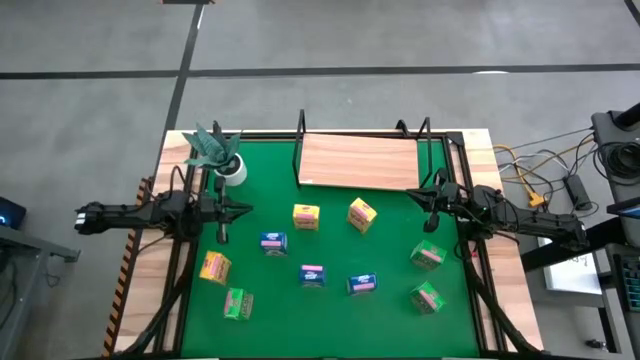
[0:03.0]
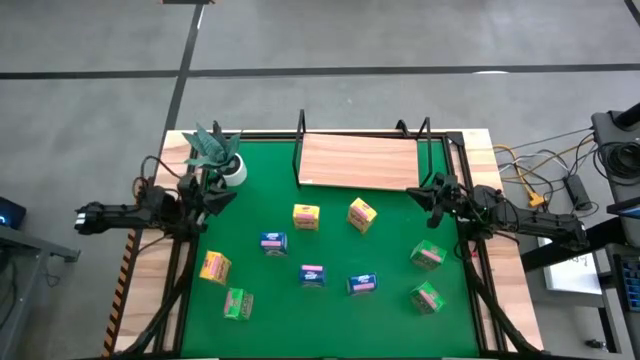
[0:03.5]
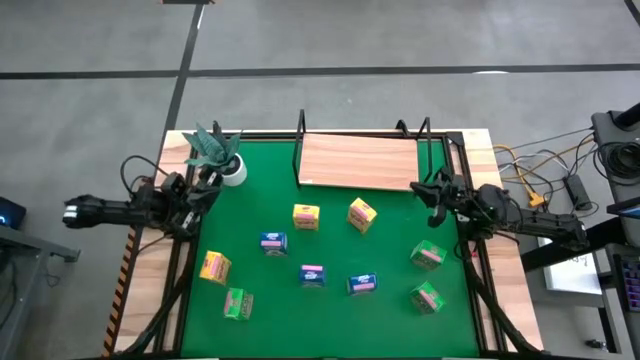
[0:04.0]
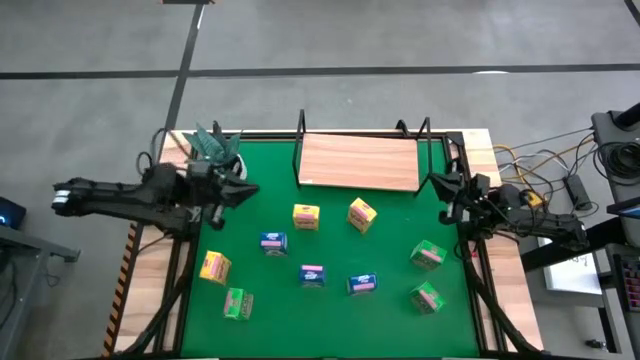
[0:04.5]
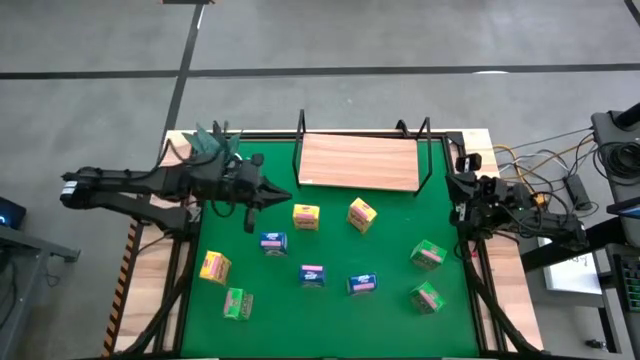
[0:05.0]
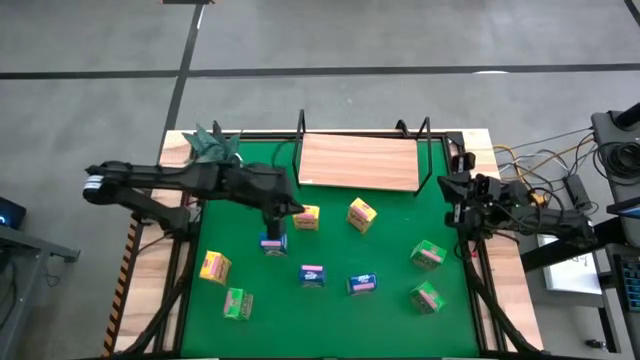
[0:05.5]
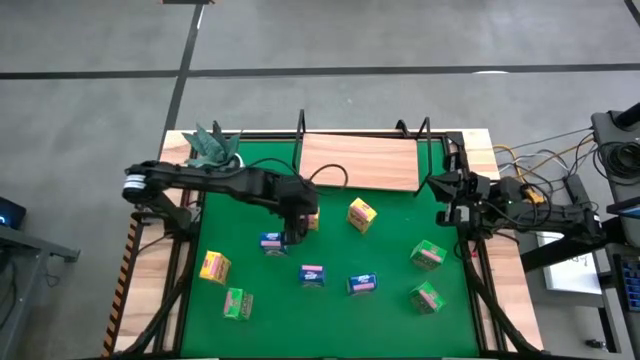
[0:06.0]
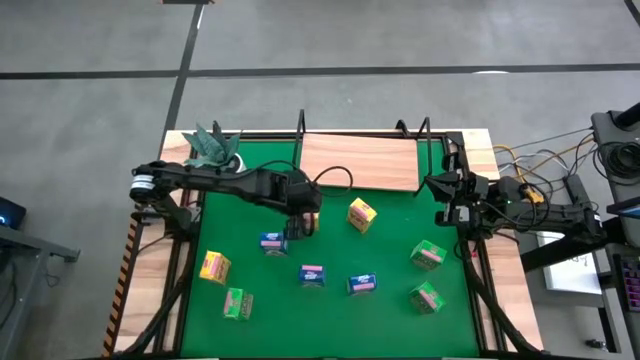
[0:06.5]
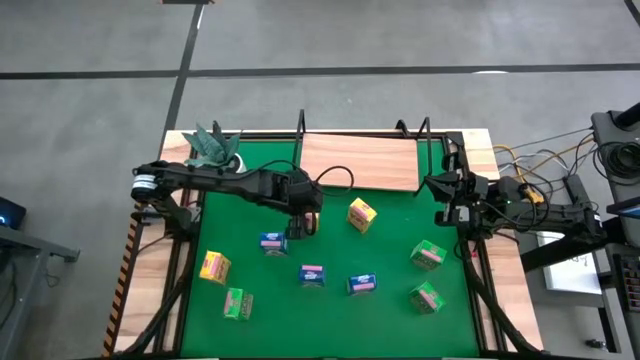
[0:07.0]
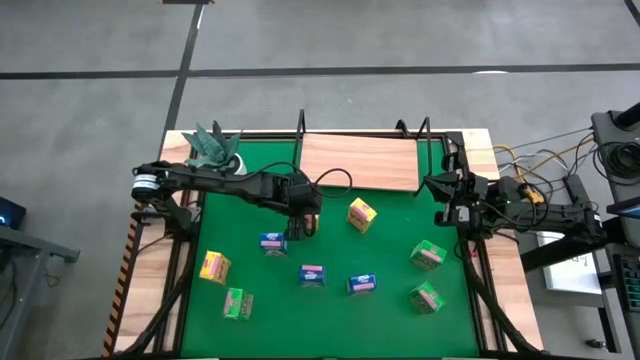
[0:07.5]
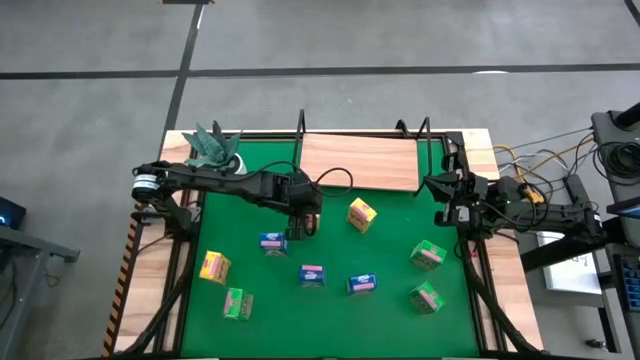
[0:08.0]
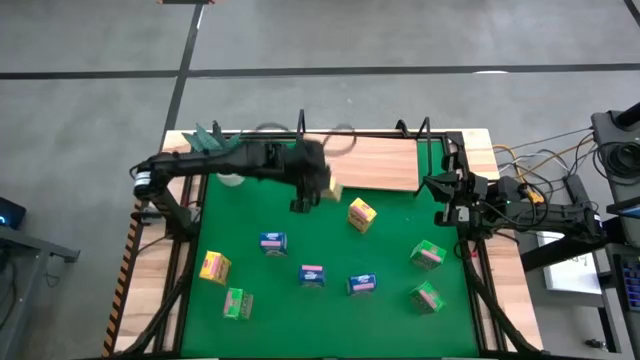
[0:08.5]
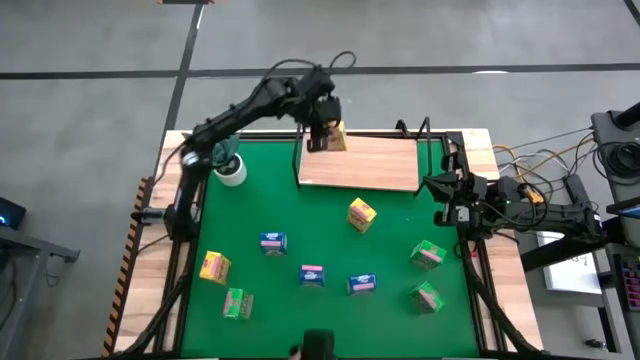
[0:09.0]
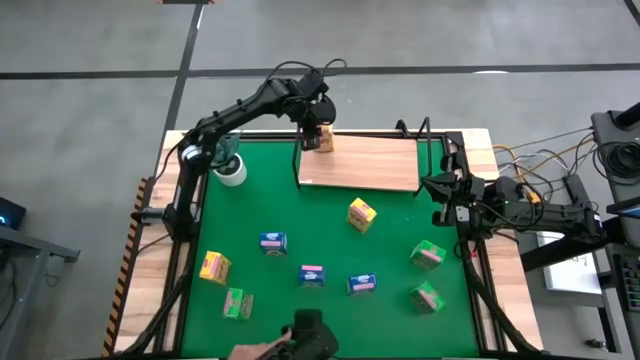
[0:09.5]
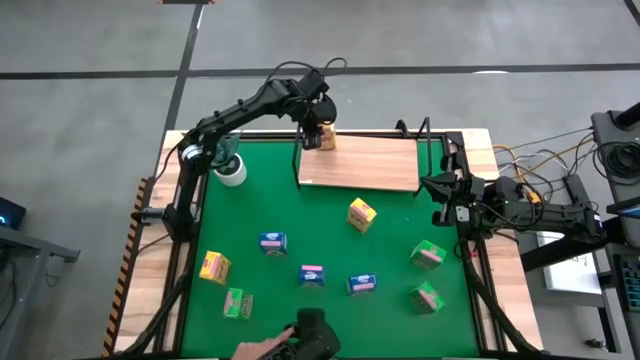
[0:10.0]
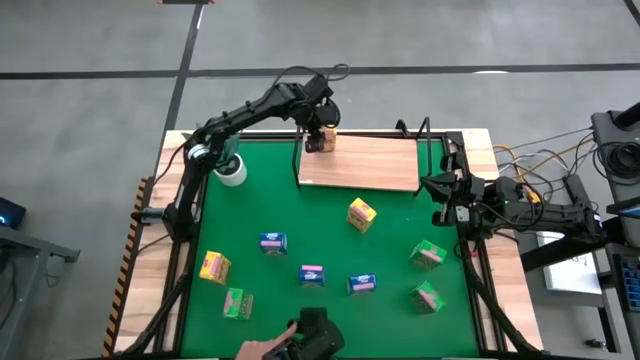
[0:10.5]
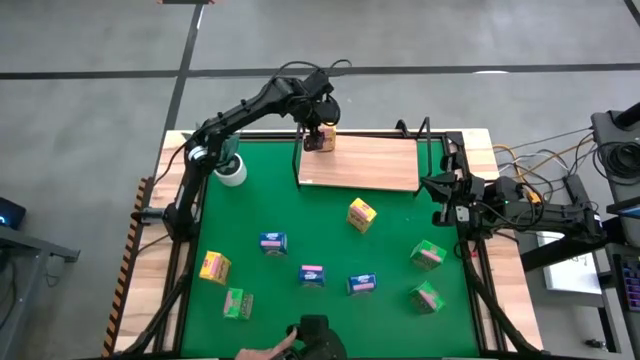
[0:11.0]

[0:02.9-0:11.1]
Task: Stack cereal on shelf
Put the middle left yellow cereal box on the shelf

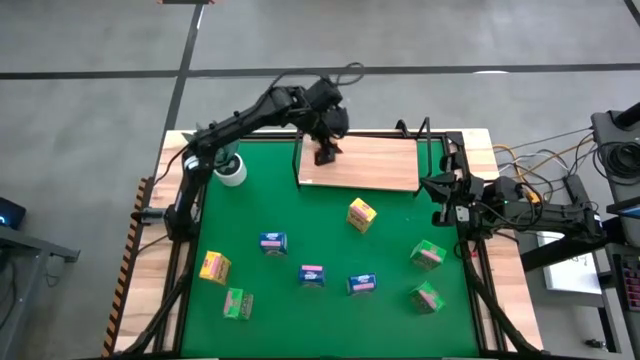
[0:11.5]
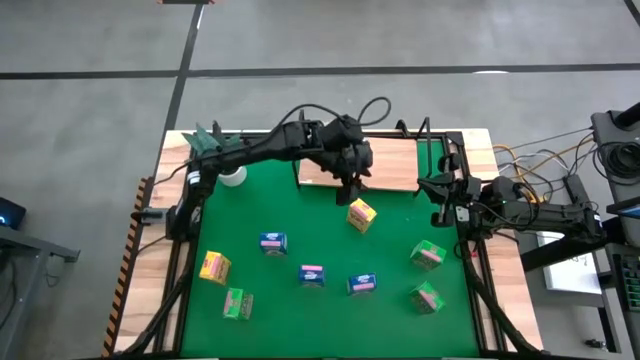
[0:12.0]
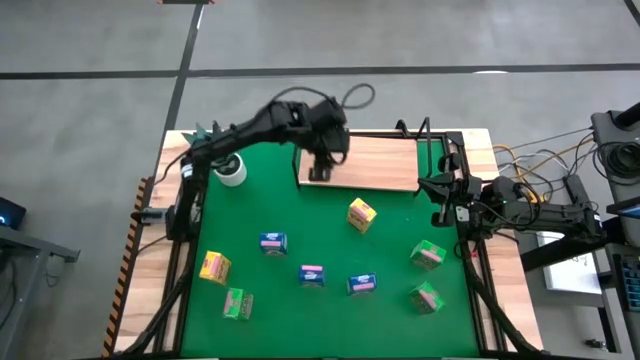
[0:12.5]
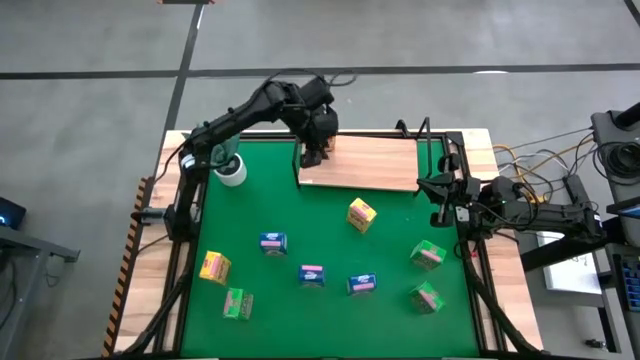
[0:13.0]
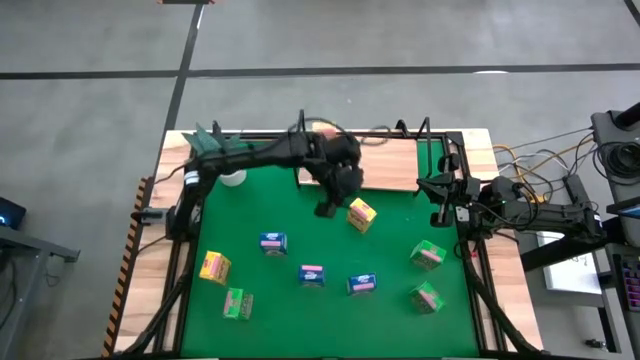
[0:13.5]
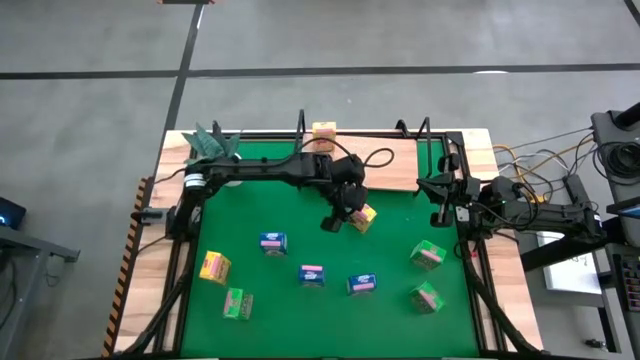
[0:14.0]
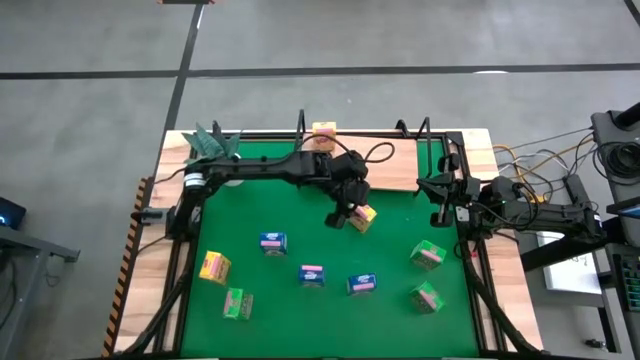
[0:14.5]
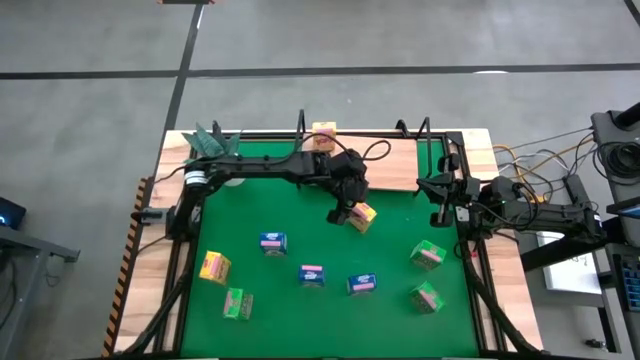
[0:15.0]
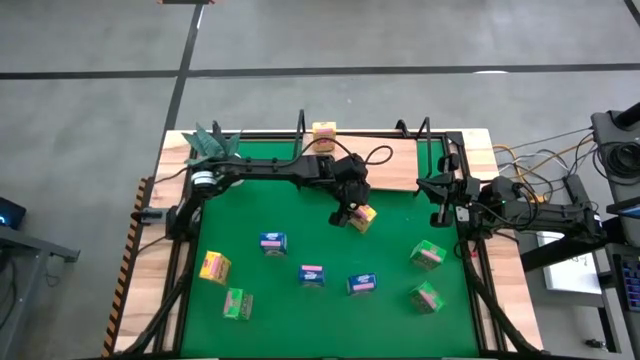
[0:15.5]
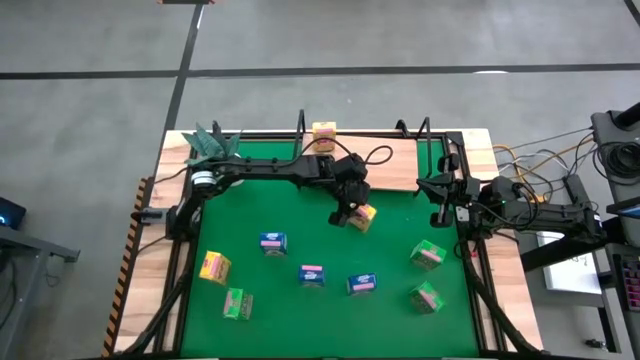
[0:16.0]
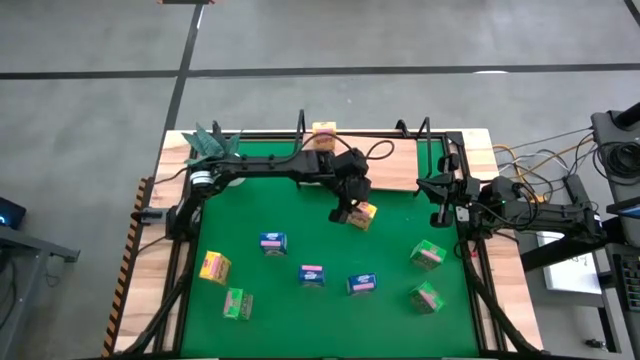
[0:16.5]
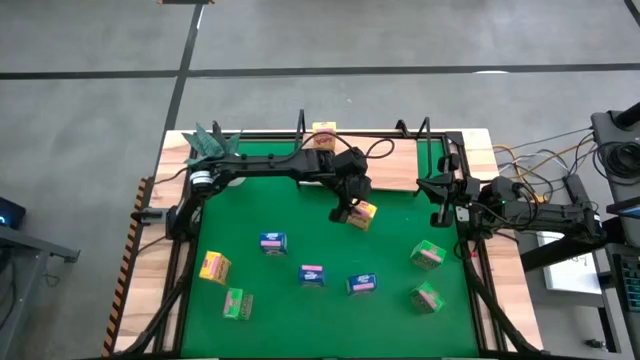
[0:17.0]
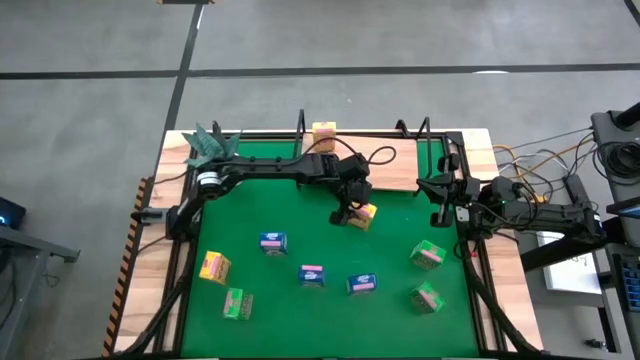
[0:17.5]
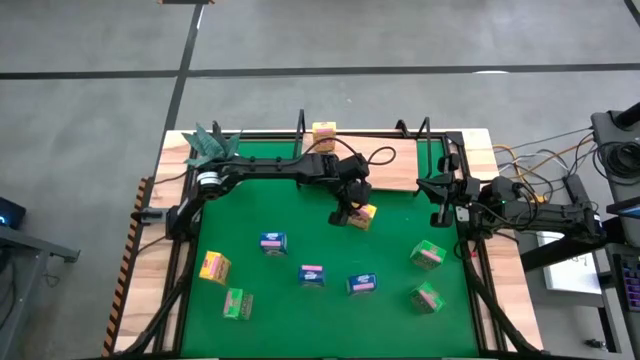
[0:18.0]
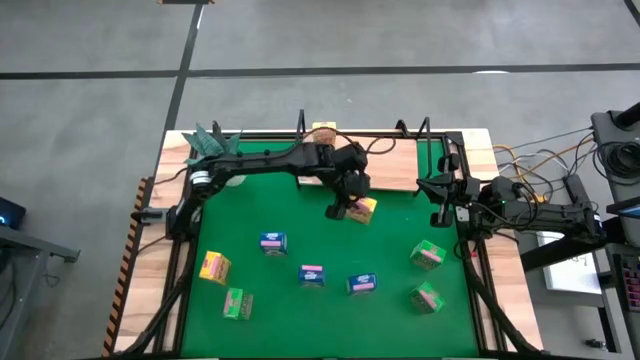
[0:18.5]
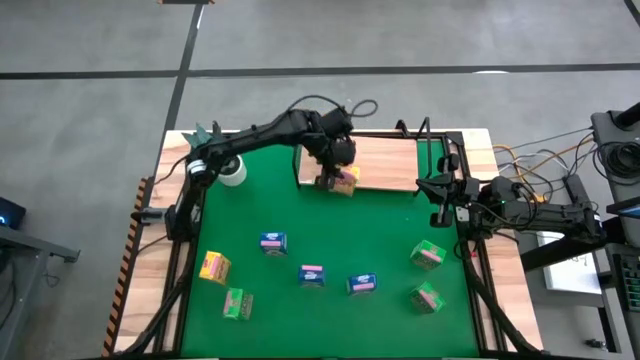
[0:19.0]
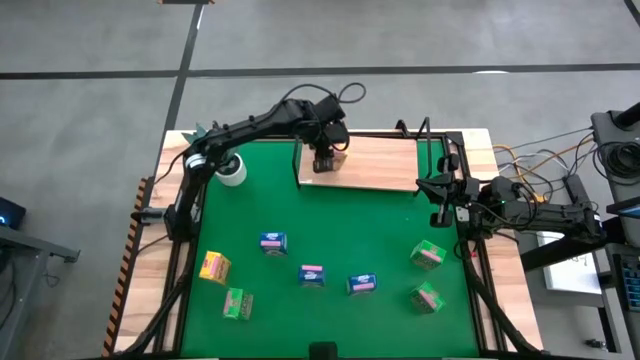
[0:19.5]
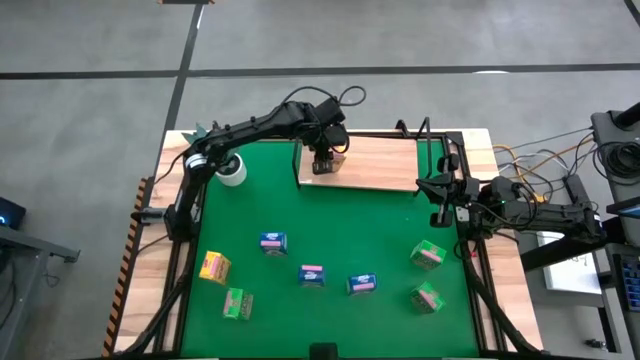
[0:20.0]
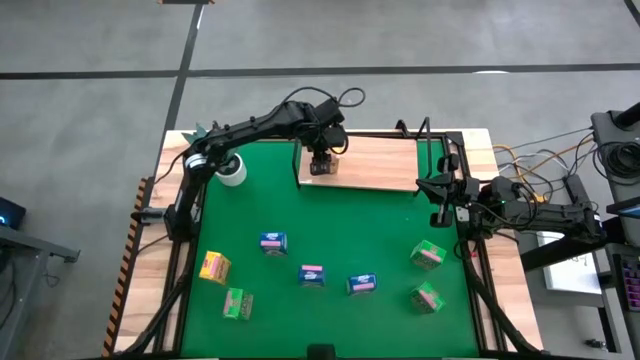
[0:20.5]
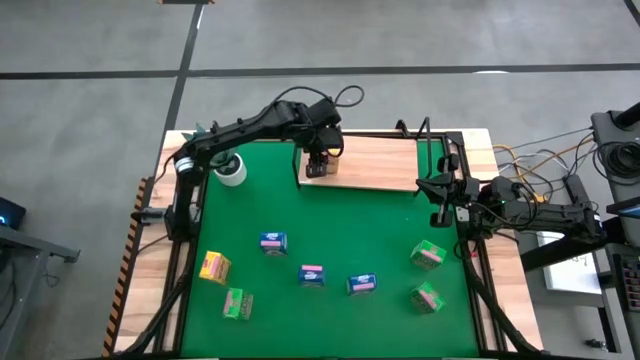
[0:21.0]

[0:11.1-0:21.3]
Put the top yellow cereal box on the shelf

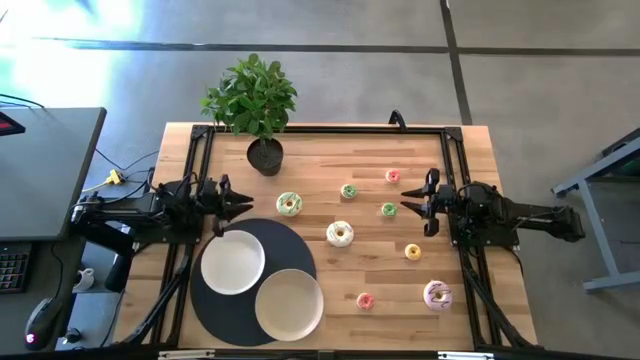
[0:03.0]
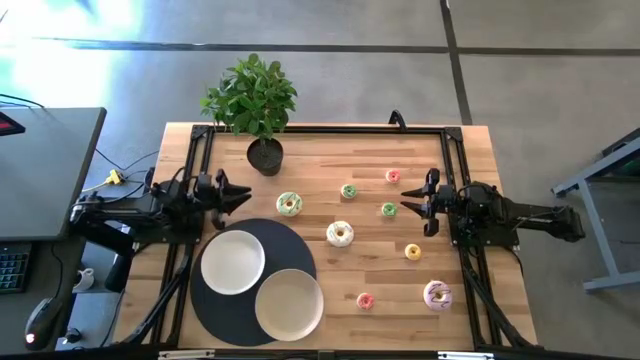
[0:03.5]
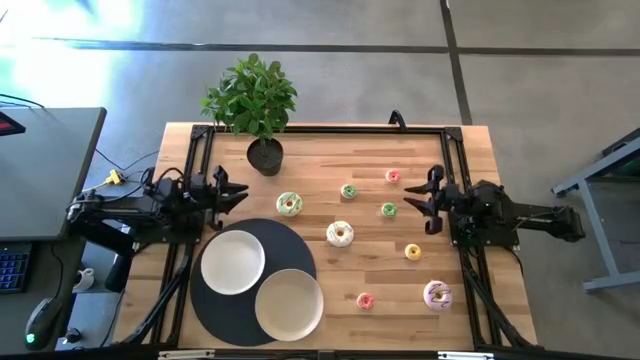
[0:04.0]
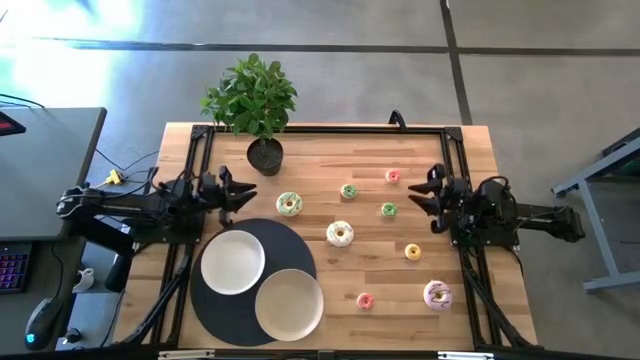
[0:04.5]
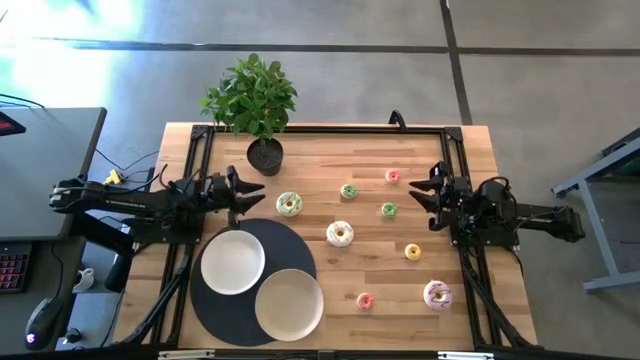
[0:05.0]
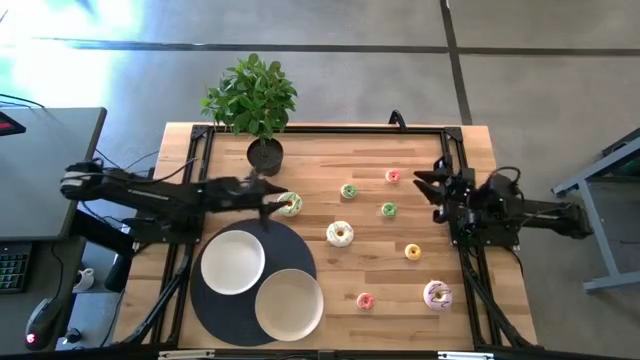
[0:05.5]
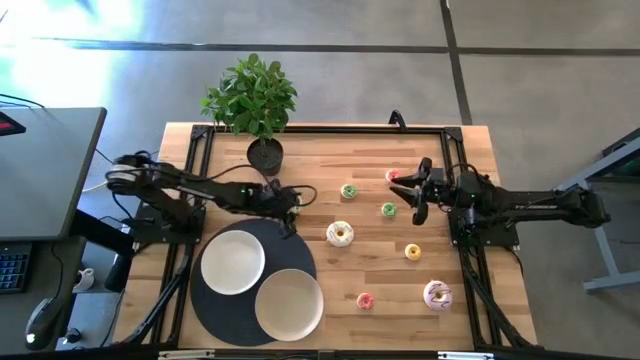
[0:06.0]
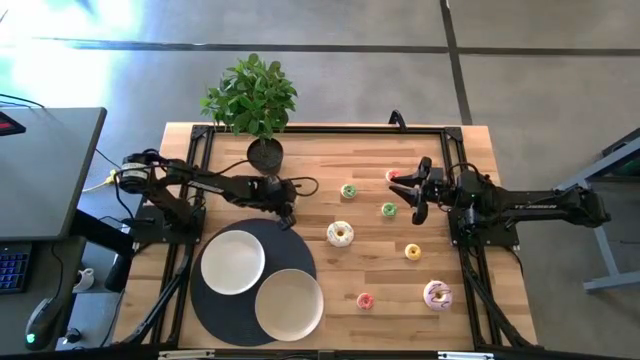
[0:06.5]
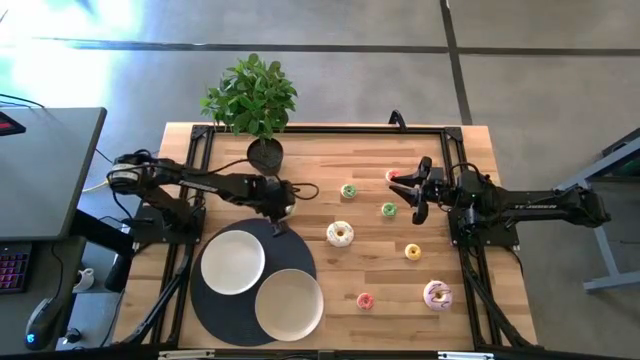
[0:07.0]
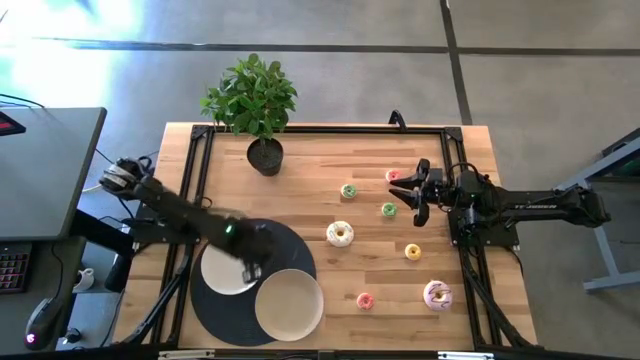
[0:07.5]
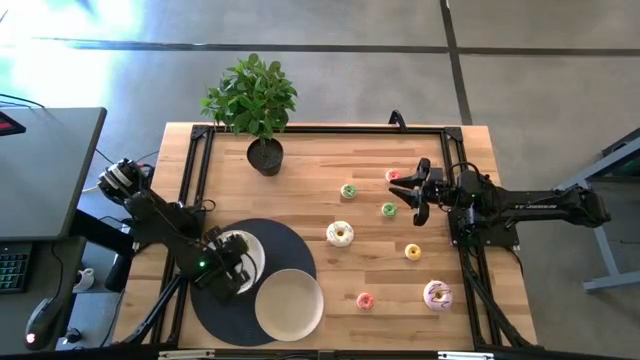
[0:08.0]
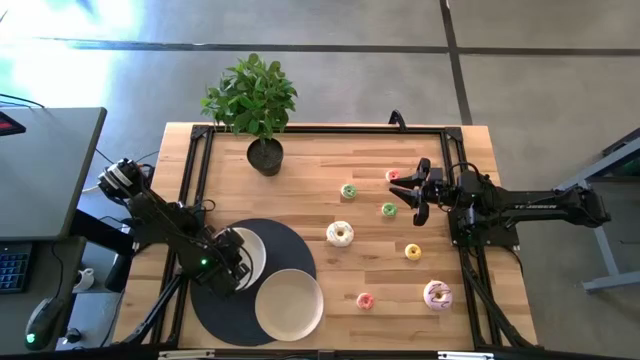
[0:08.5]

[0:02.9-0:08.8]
Task: Pick & Place donuts
Put the large blue donut on the white plate
